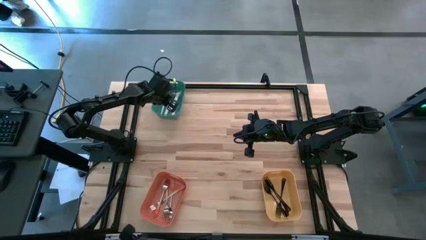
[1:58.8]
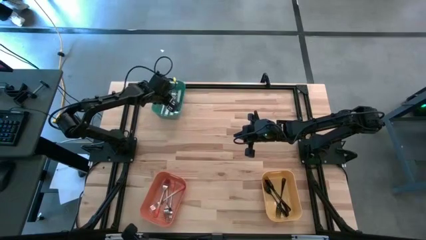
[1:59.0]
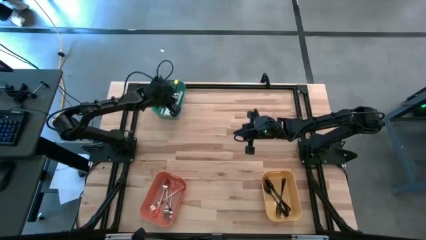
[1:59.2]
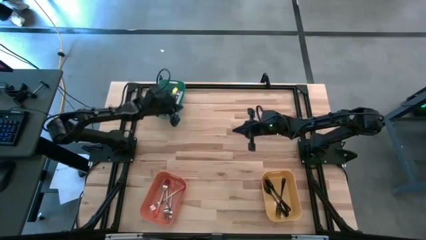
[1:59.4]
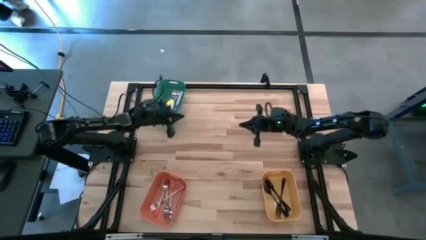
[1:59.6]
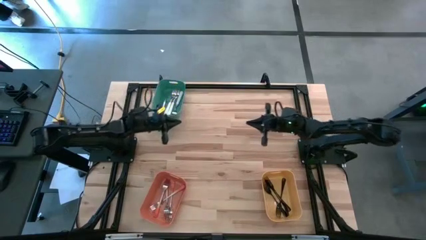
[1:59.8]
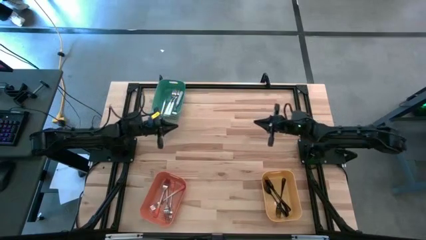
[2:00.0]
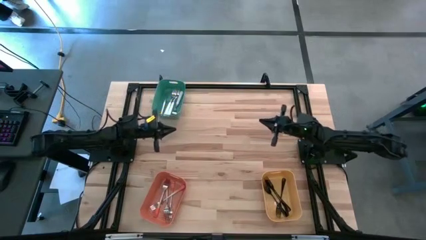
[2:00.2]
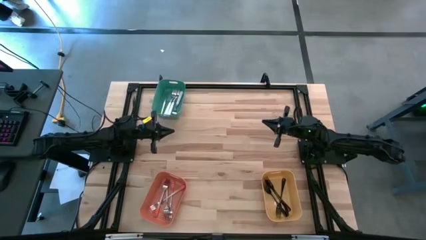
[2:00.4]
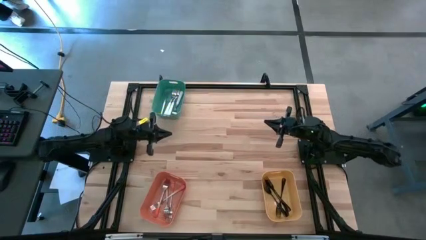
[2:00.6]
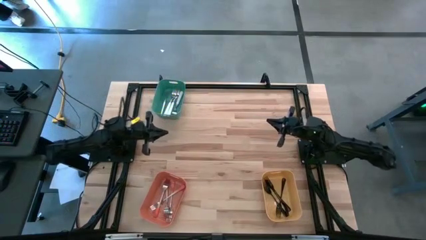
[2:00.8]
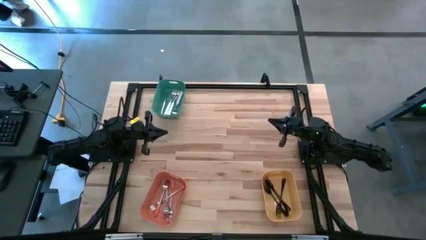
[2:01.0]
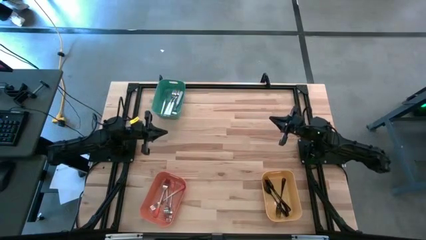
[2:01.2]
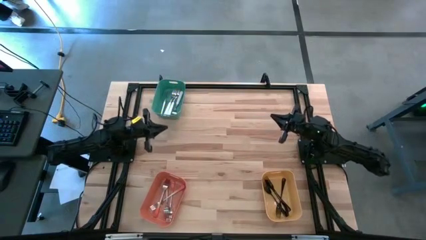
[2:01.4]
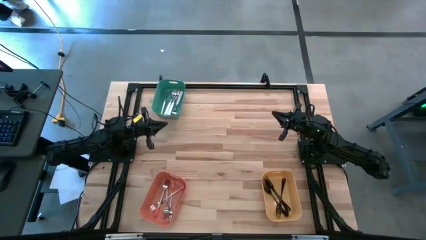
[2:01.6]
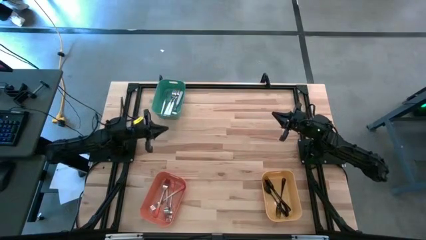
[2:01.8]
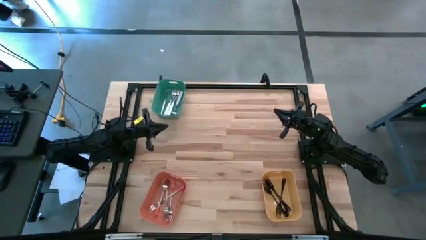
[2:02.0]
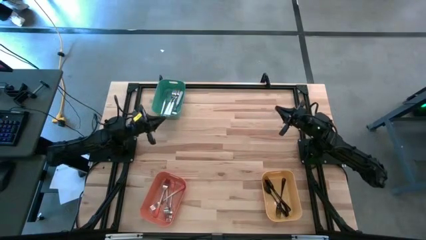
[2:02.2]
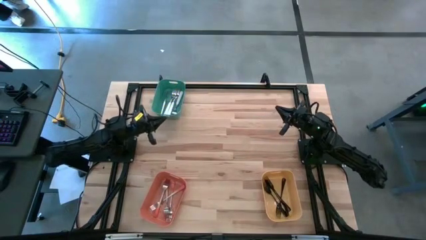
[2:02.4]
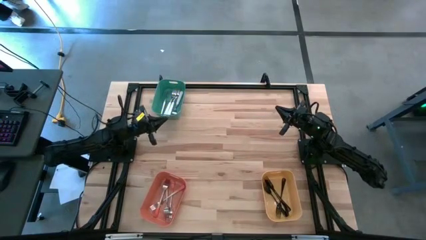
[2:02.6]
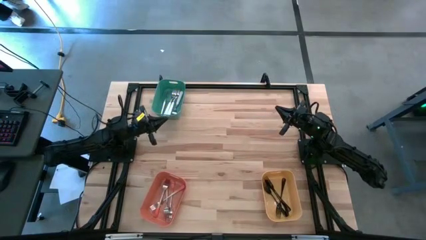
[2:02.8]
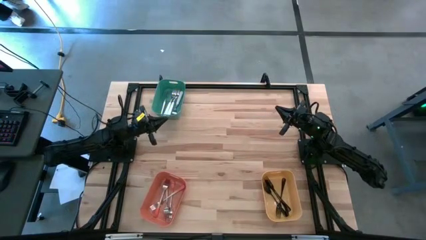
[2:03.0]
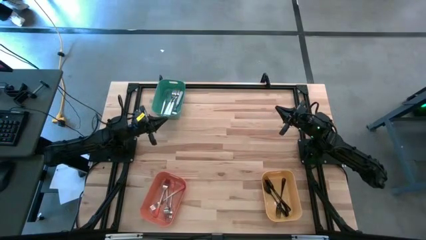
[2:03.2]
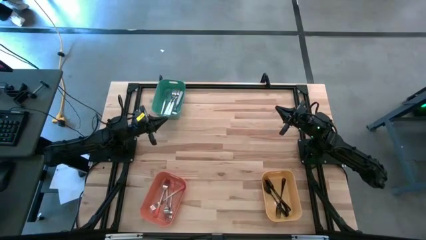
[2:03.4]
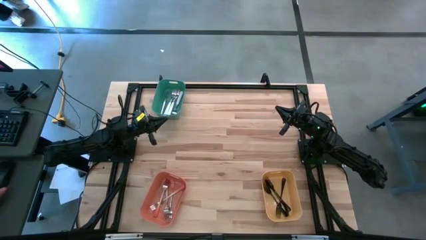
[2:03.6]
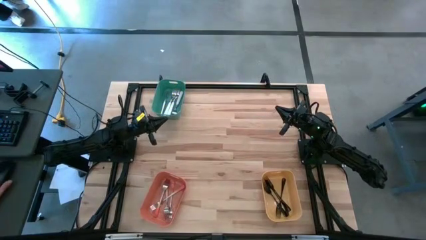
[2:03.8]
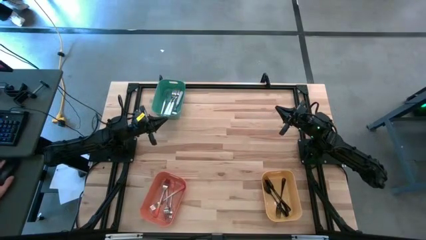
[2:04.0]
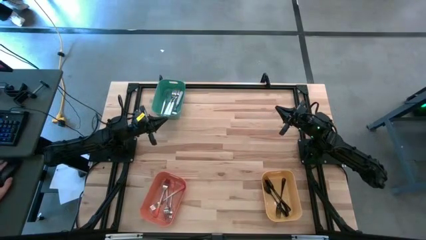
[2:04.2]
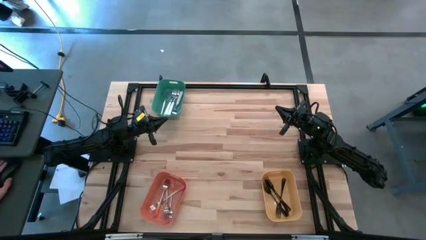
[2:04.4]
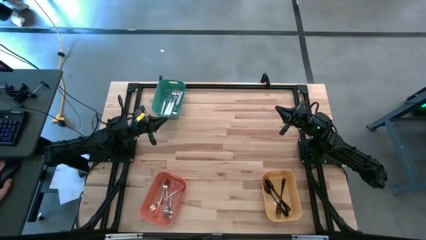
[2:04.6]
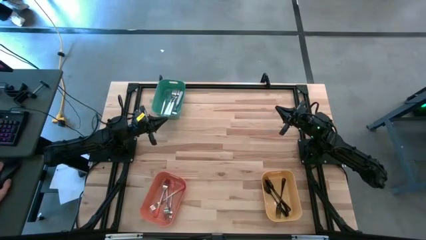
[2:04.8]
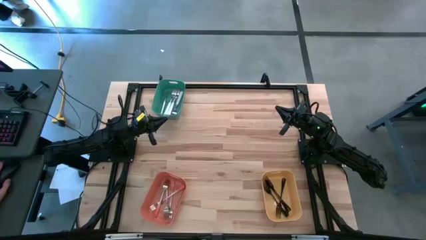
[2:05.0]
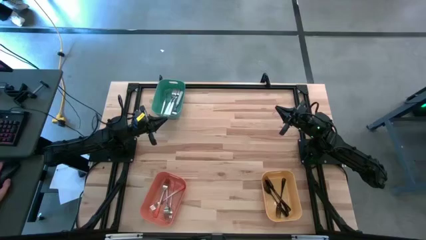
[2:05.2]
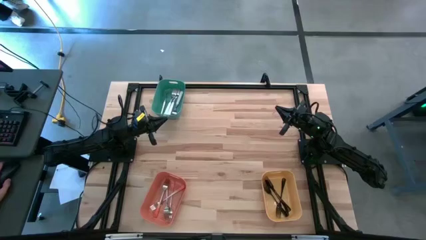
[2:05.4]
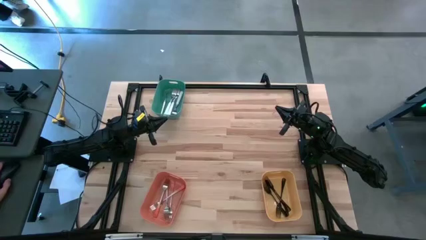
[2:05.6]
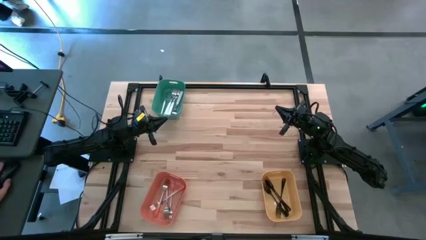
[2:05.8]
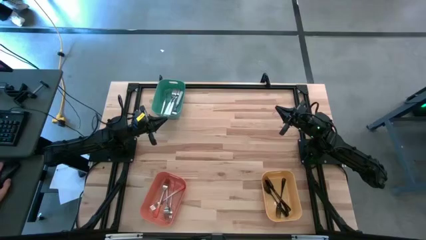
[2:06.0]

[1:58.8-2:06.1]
Task: Sort silverware by color (type)
Return to Home Position

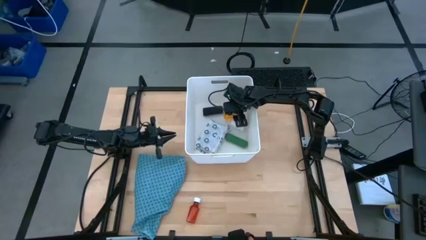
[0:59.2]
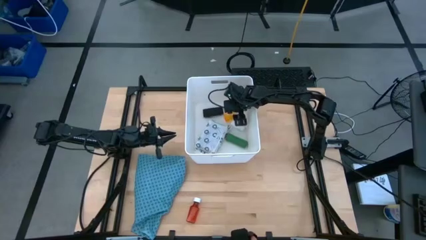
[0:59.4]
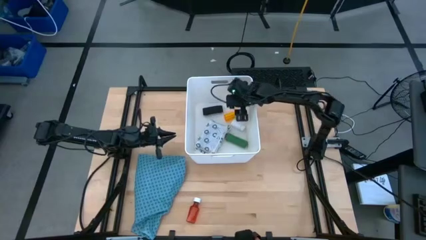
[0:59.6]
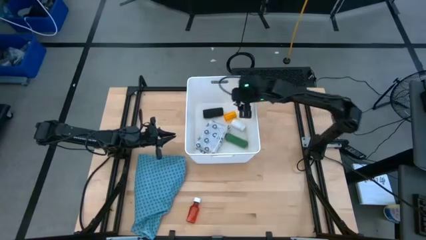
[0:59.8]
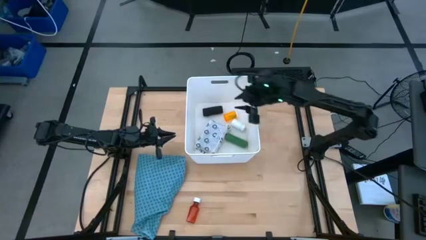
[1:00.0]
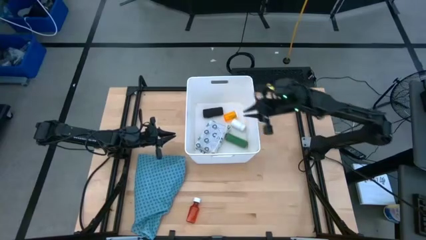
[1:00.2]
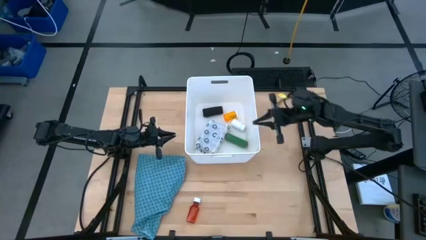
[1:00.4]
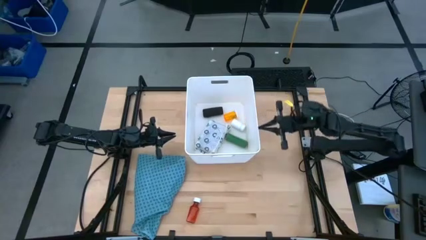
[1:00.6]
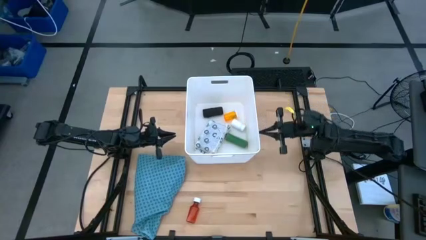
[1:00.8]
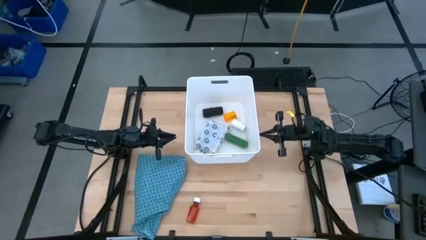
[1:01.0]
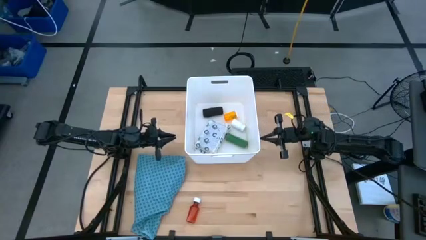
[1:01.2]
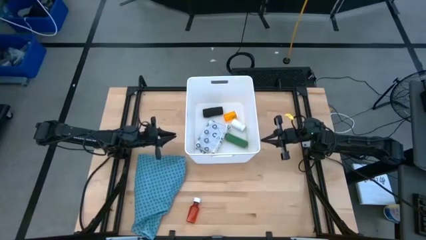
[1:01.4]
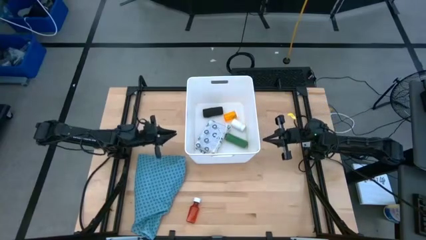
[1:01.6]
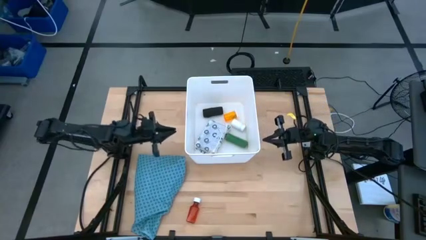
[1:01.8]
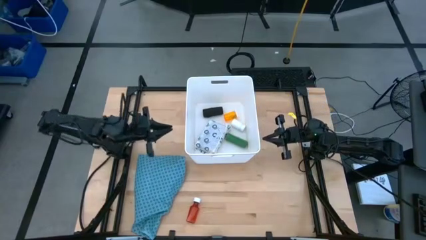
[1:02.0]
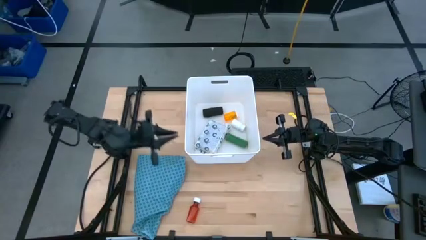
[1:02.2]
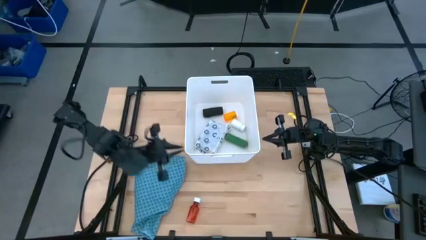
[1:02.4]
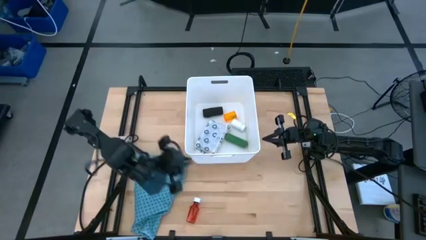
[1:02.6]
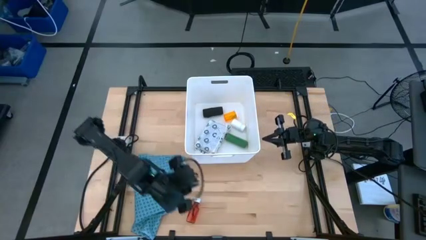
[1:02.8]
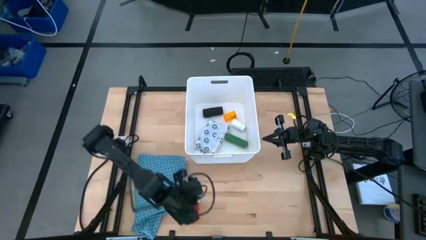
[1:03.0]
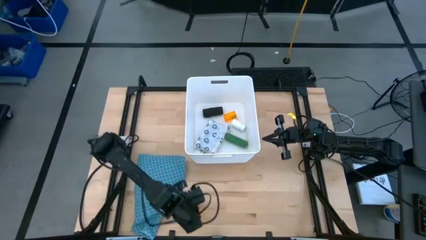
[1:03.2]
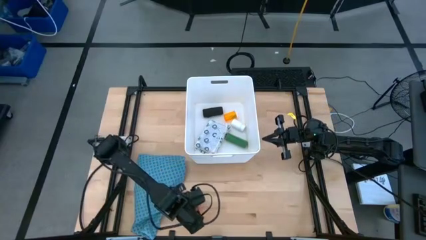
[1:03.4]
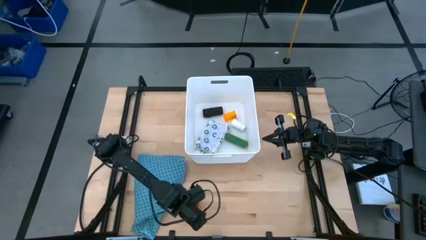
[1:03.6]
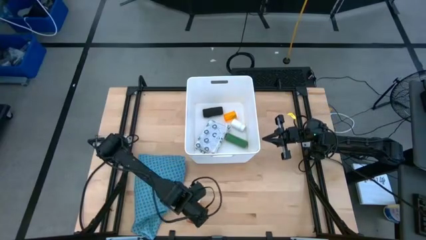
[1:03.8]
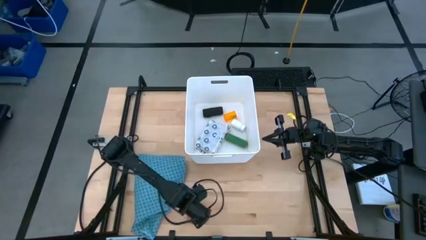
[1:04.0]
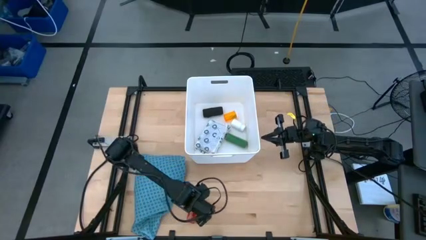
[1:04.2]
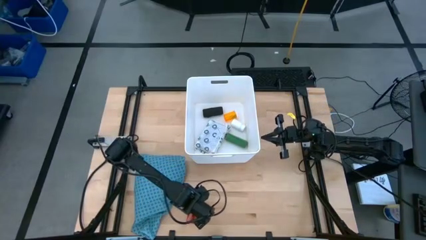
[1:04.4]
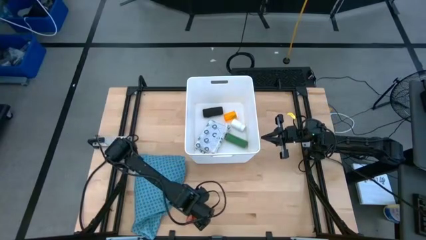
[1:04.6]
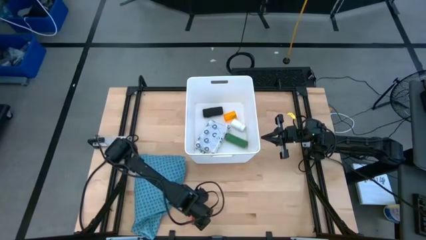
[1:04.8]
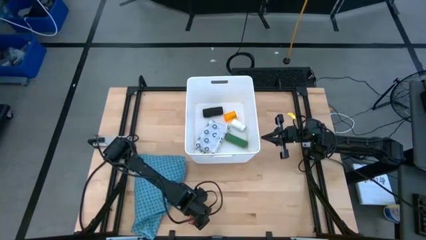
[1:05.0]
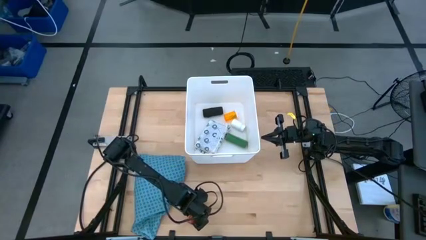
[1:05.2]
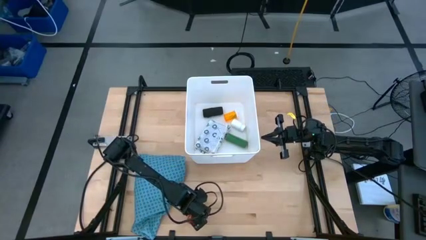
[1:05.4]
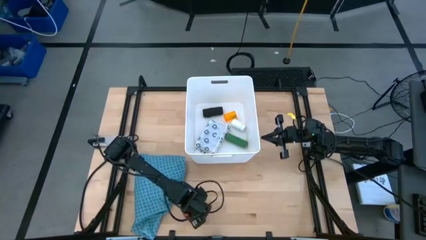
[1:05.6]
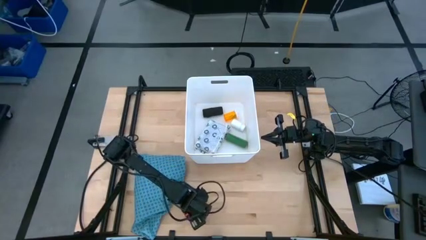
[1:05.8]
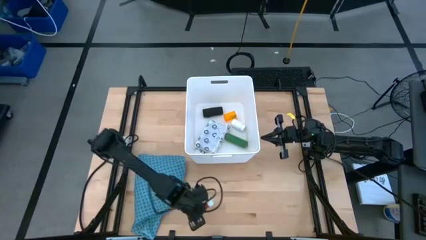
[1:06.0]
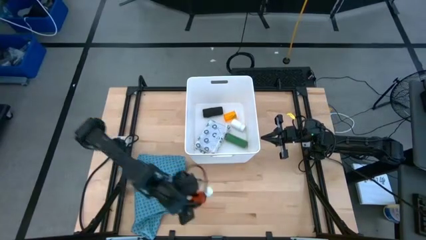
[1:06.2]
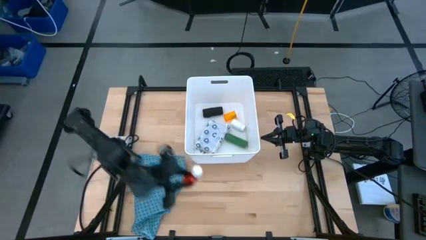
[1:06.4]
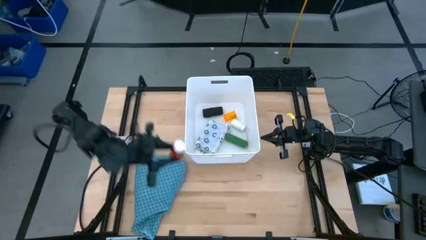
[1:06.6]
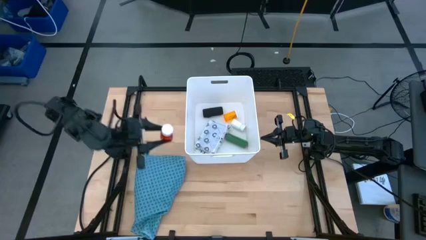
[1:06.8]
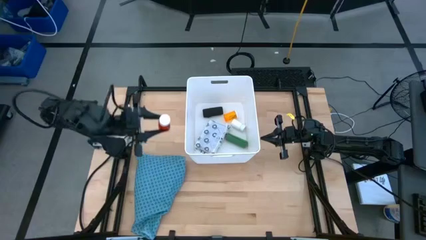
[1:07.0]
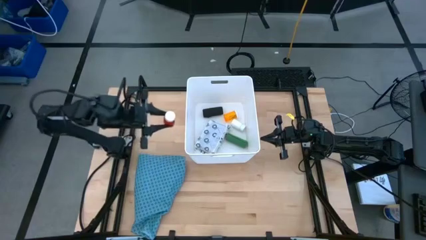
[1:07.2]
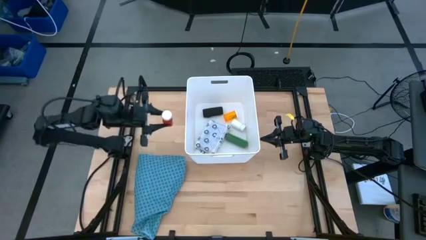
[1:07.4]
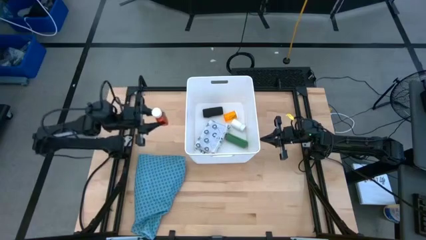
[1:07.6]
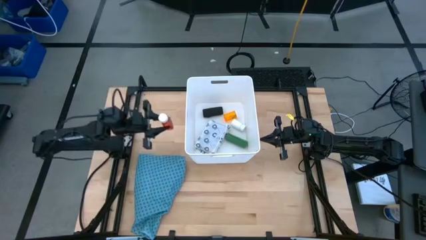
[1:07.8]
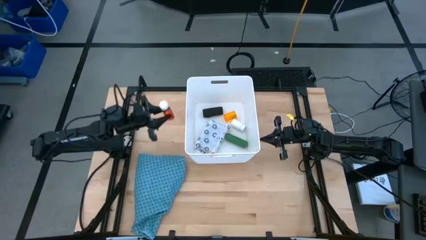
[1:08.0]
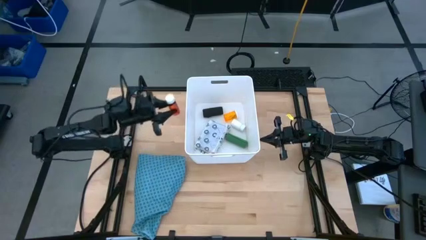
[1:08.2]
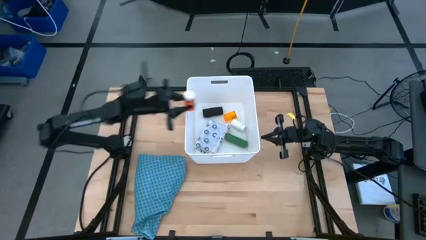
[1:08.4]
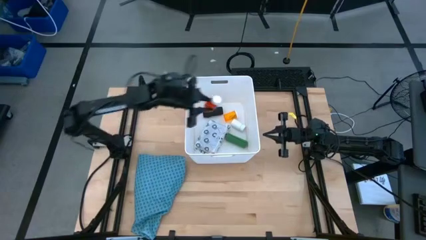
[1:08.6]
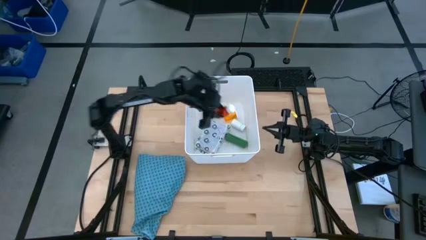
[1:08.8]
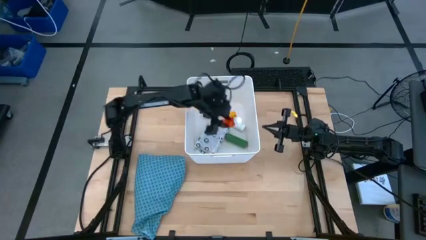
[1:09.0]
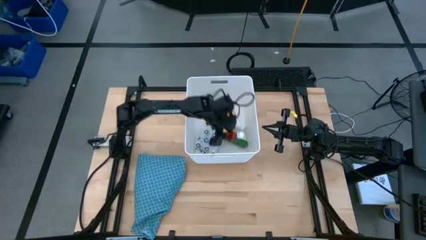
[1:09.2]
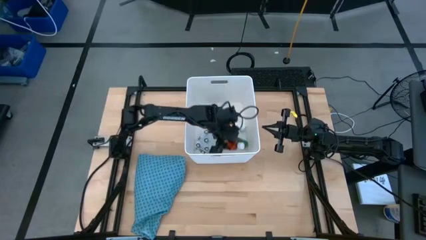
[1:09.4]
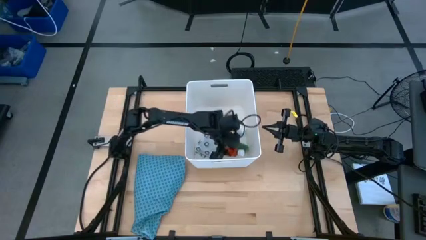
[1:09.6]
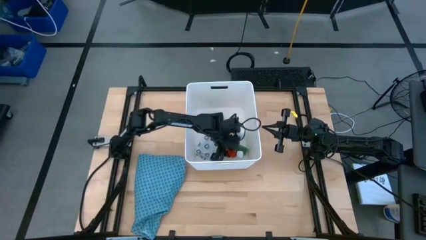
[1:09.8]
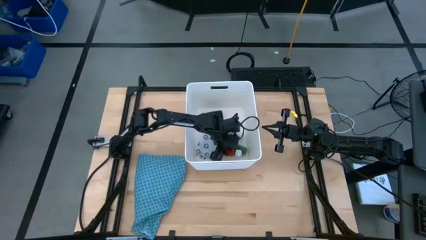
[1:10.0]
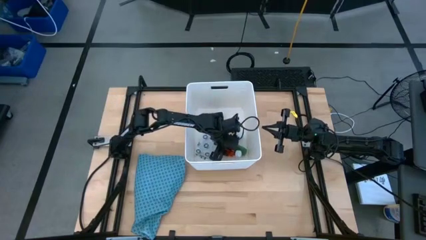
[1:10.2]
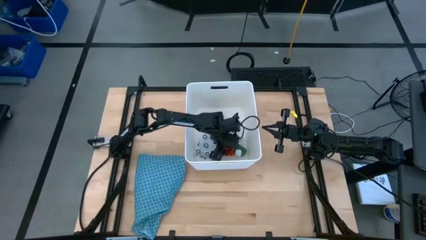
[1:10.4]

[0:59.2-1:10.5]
Task: Pick & place medical supplies in basket/bin
Put the red bottle into the white bin
